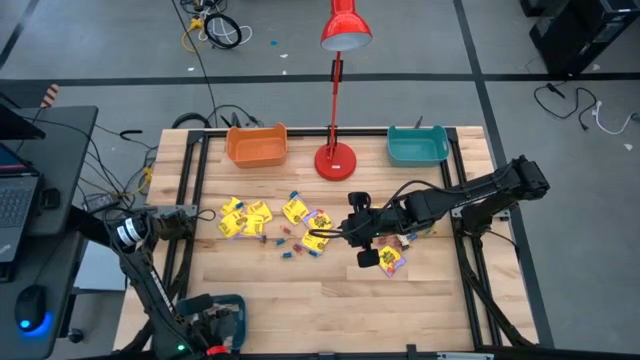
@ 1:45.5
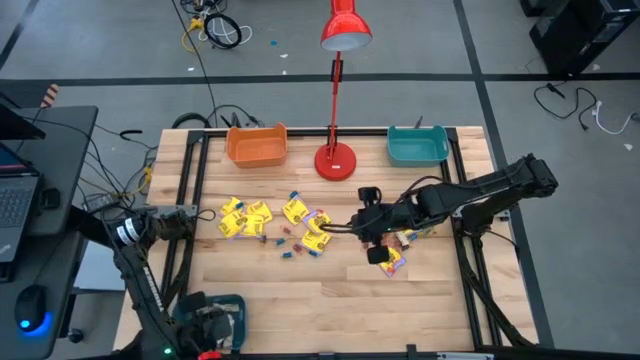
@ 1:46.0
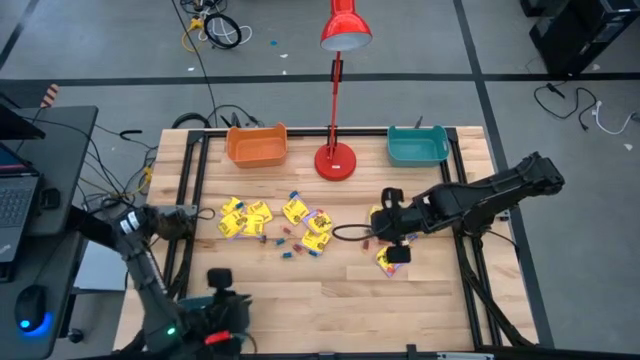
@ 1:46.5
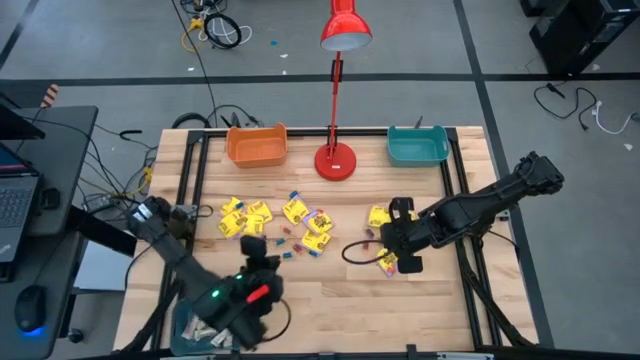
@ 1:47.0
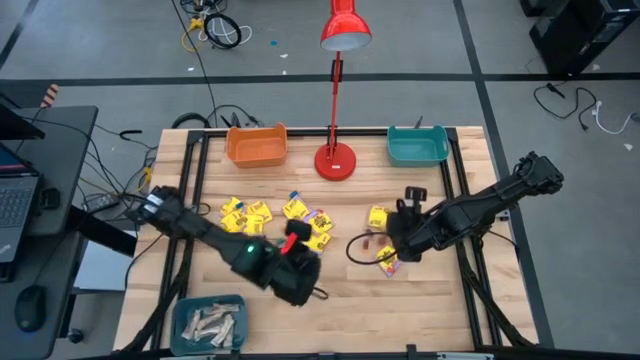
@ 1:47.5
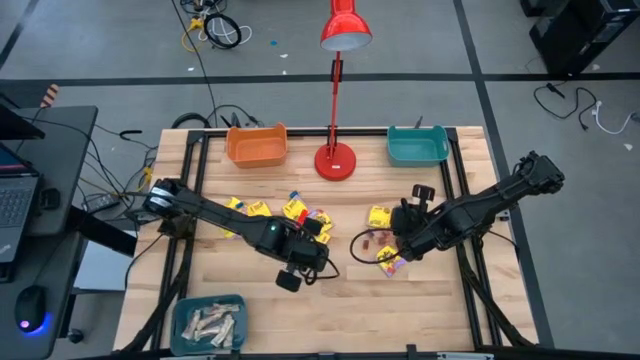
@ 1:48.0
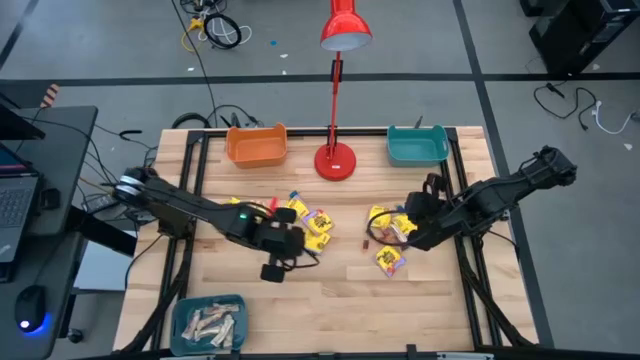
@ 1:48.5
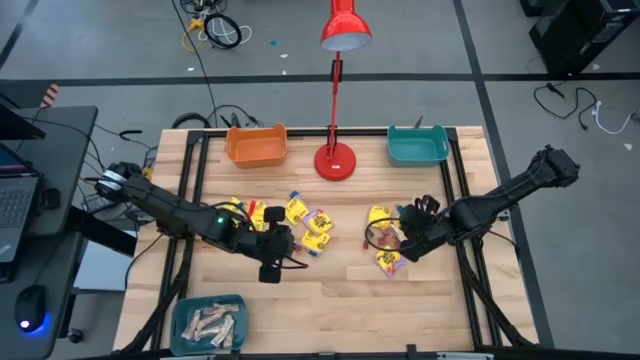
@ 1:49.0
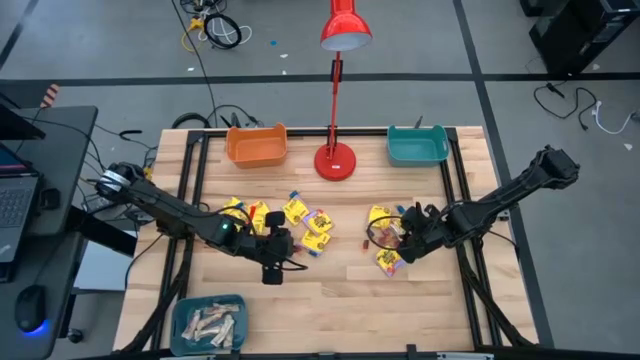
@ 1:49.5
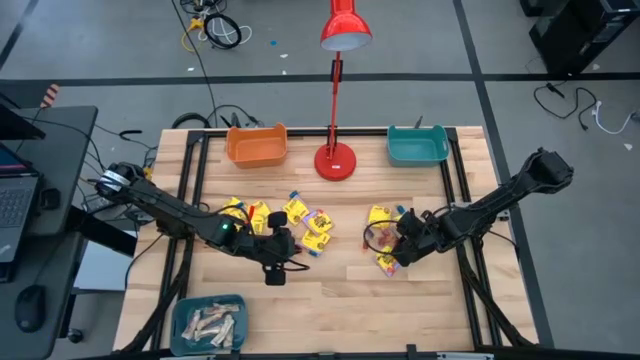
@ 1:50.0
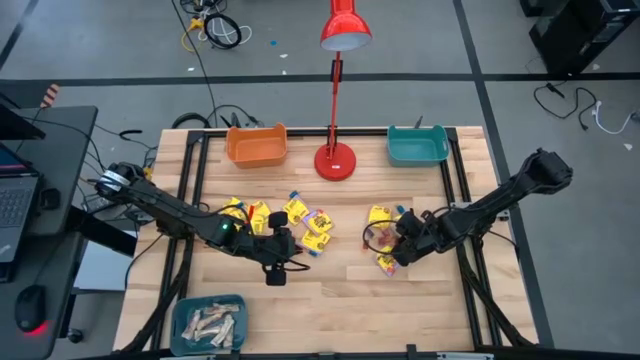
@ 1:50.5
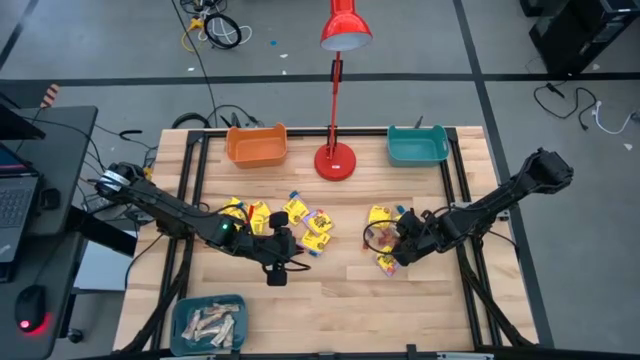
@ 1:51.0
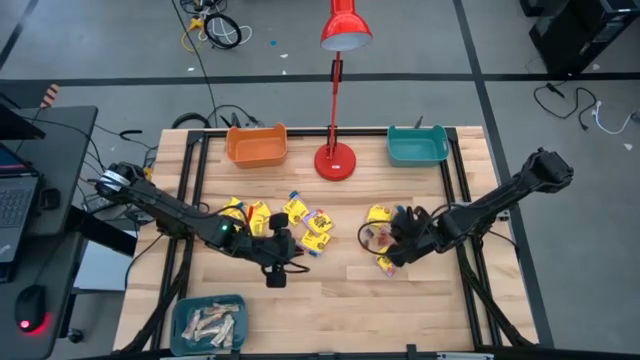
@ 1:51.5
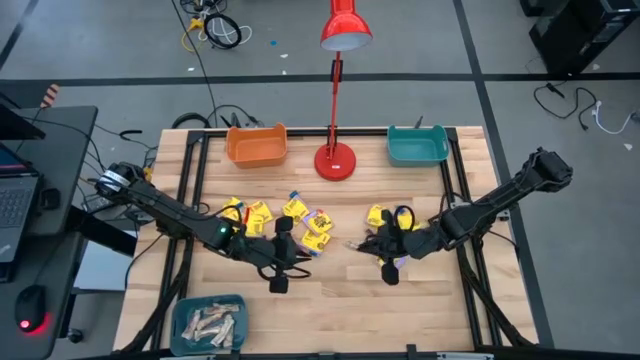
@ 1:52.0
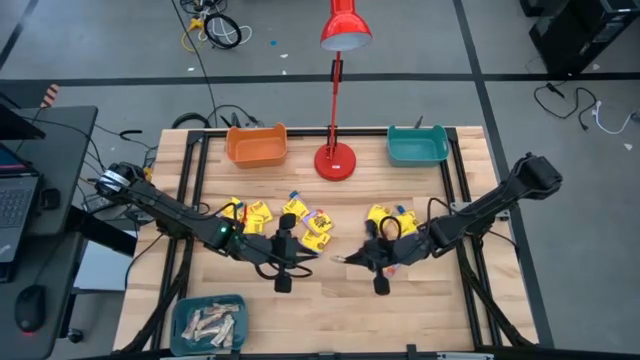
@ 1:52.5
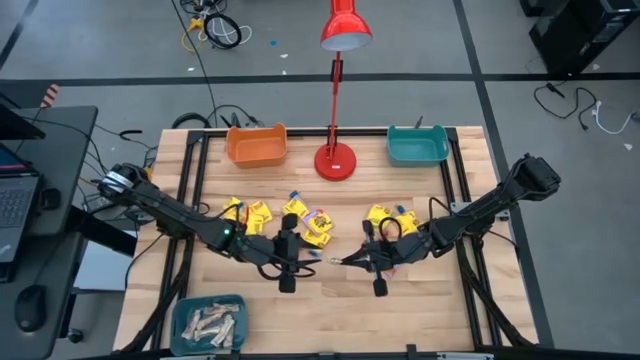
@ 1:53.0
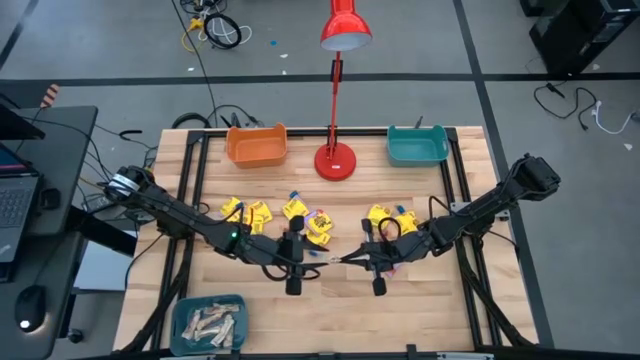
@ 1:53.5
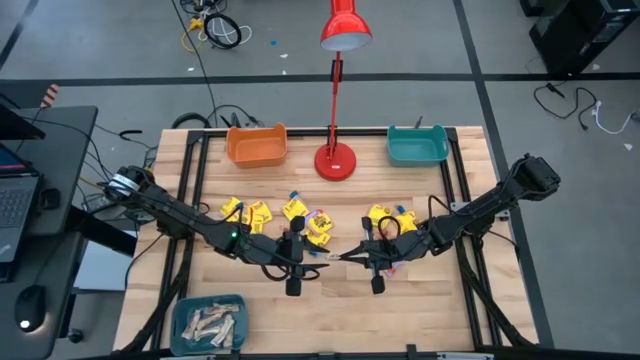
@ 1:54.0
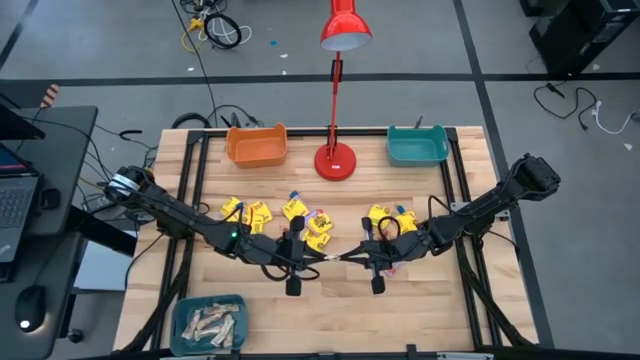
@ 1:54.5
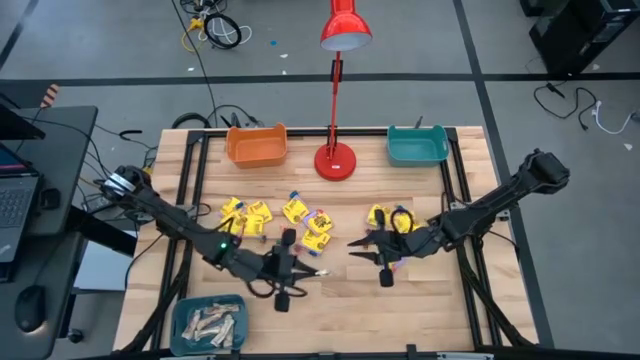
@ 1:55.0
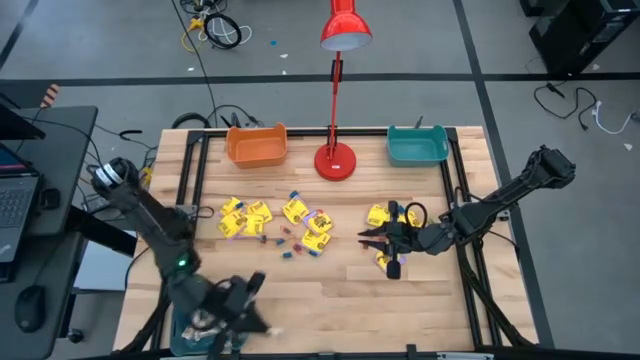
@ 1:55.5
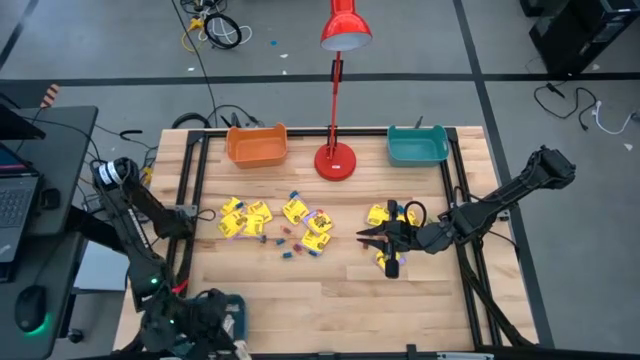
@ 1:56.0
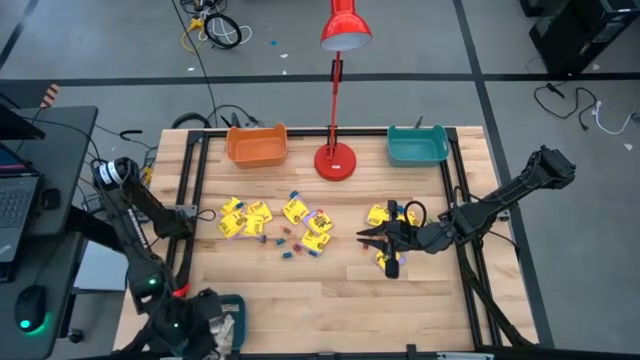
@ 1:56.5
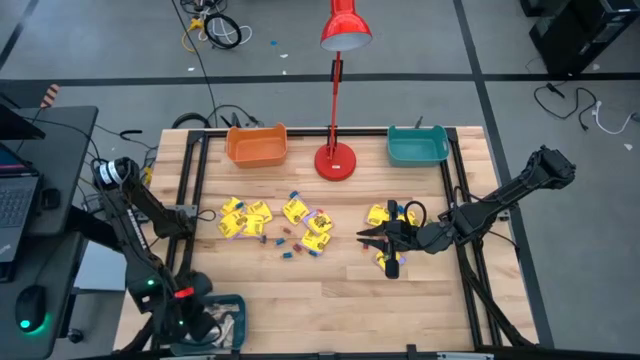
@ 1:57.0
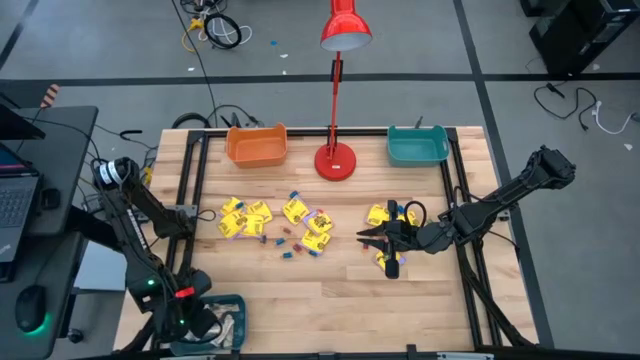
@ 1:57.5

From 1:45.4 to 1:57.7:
Task: Sort candy
Put the white candy into the blue bin

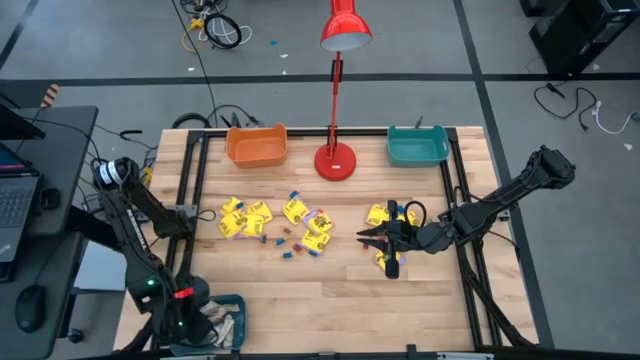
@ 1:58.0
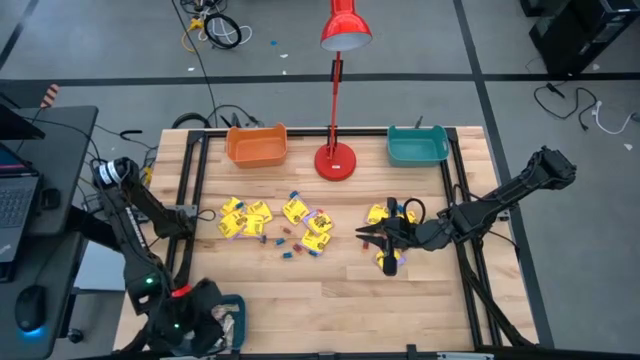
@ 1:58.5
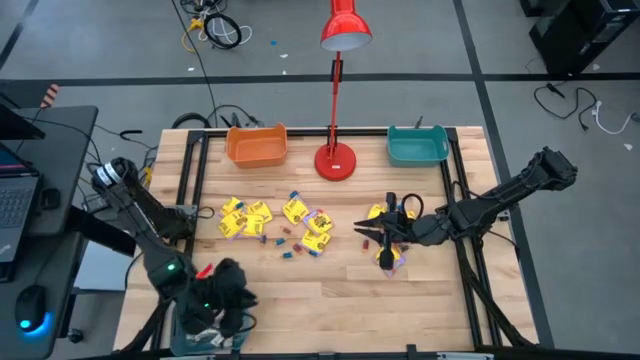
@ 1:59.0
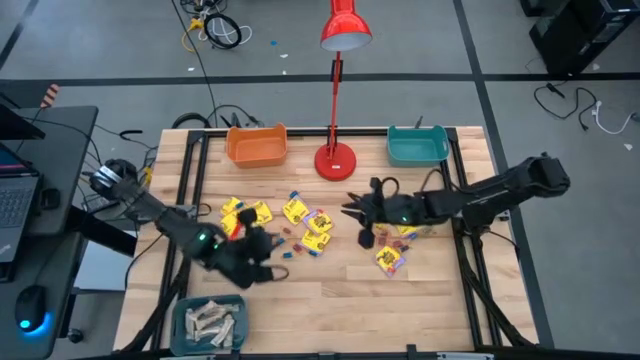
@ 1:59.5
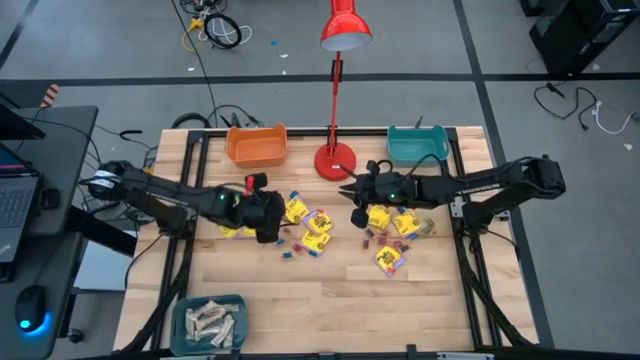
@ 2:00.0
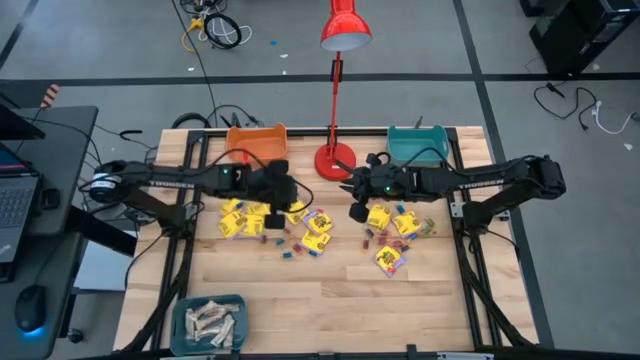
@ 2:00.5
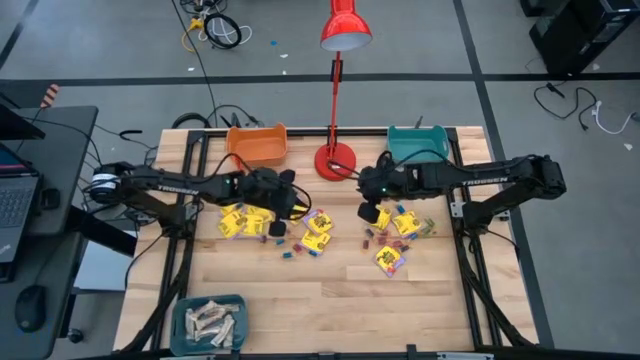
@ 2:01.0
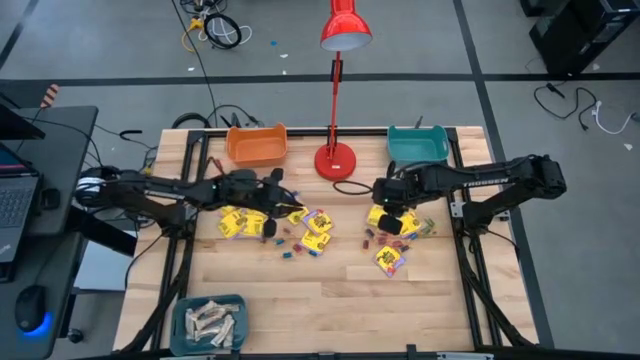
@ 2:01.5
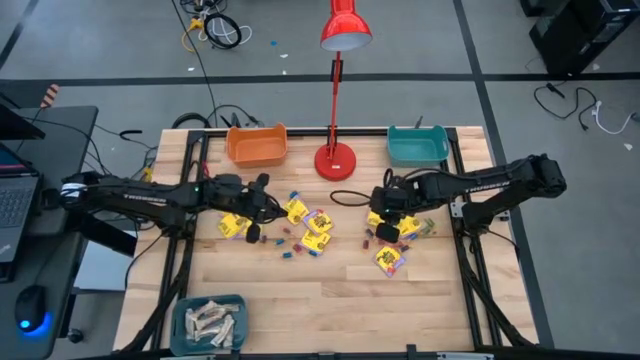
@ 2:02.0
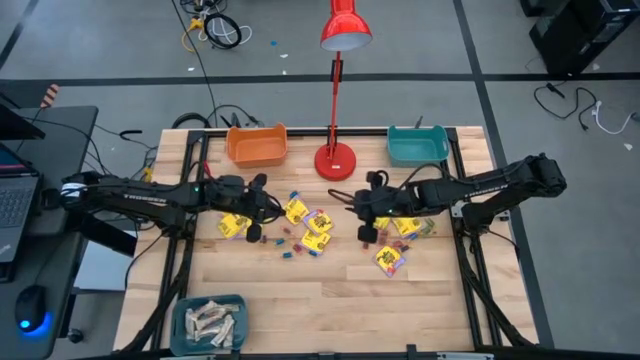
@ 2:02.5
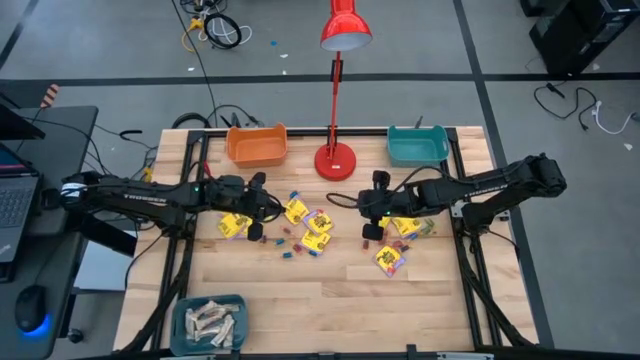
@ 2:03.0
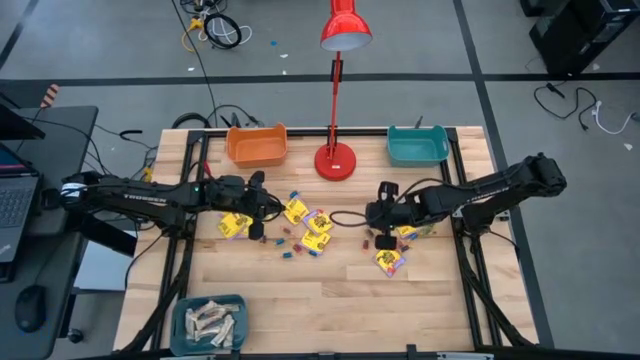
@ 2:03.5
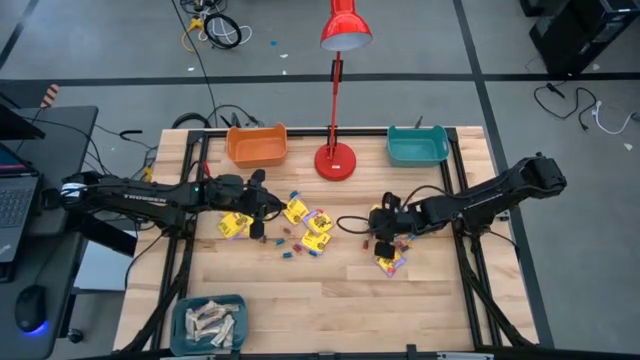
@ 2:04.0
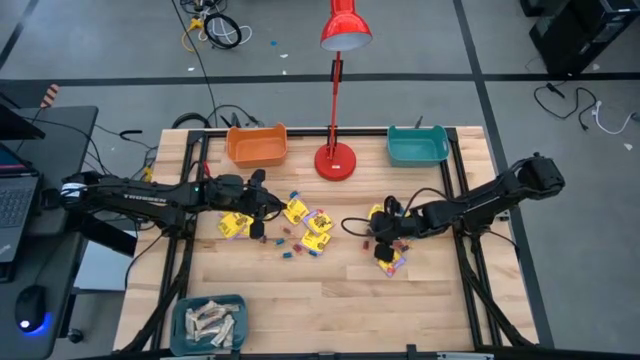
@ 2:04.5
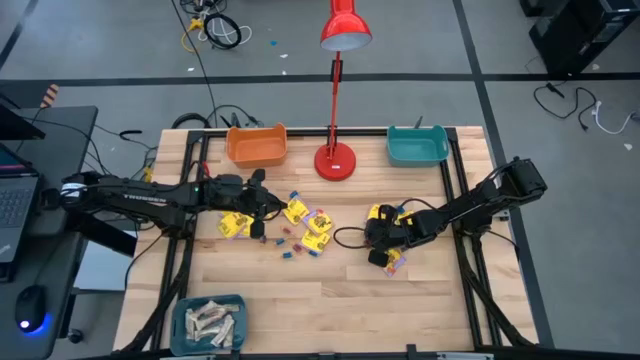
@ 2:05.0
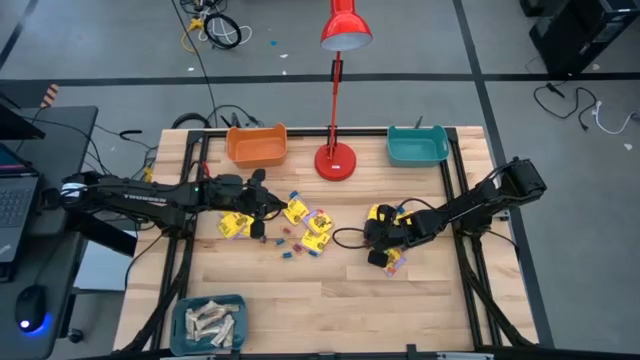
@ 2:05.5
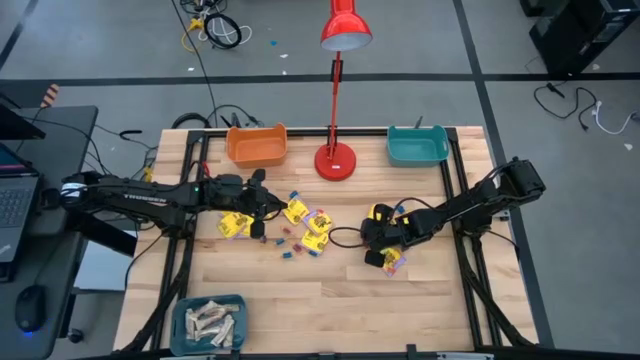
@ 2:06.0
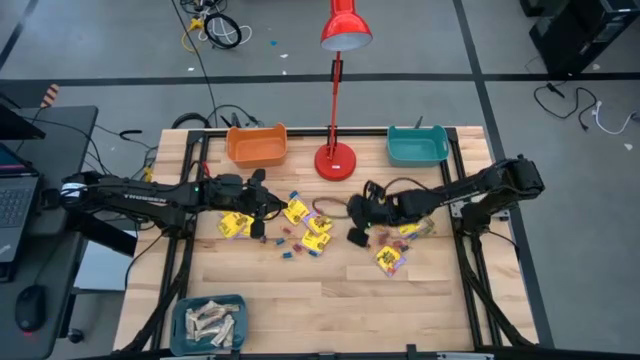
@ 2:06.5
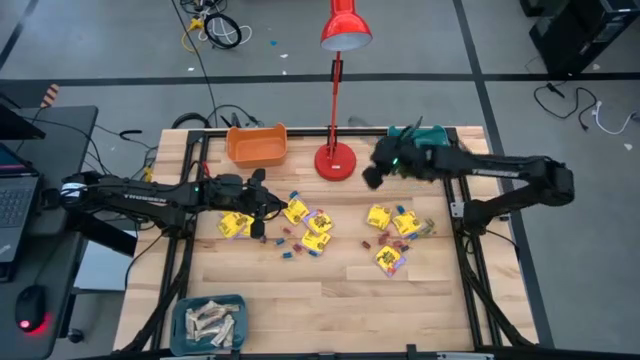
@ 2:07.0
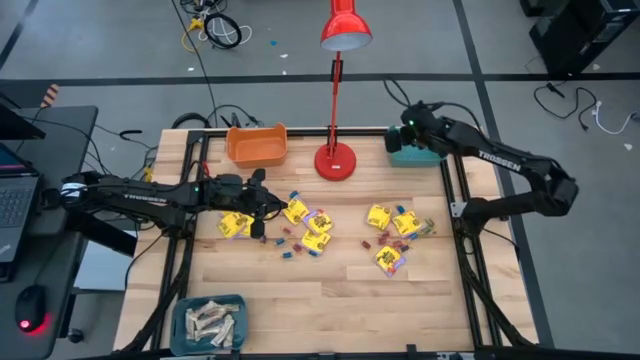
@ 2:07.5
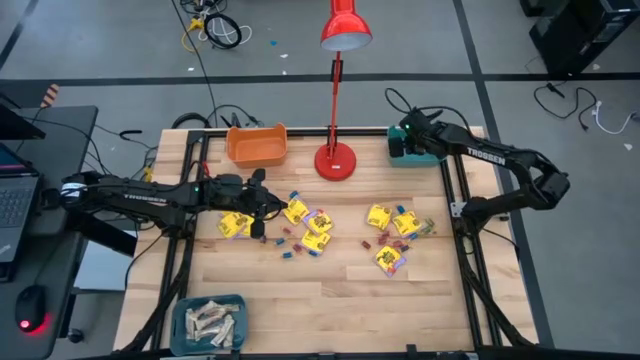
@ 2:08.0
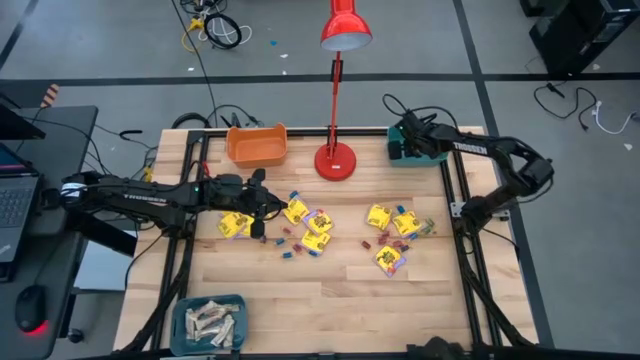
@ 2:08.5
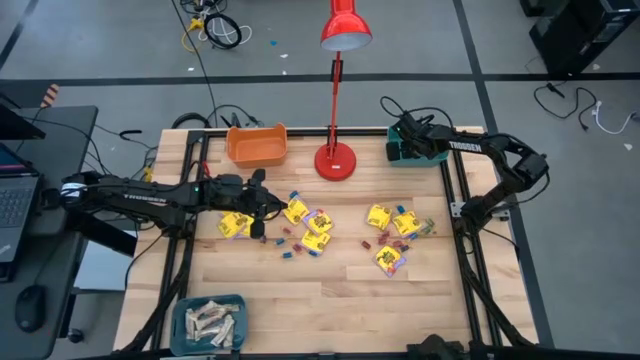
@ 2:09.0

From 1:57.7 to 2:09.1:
Put the small blue candy into the green bin
